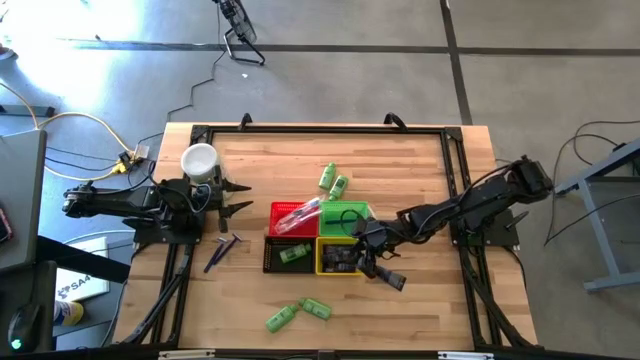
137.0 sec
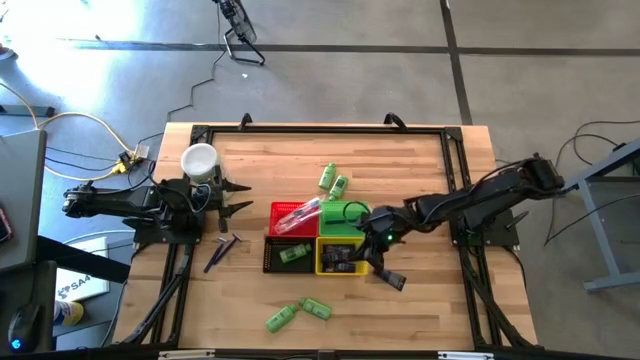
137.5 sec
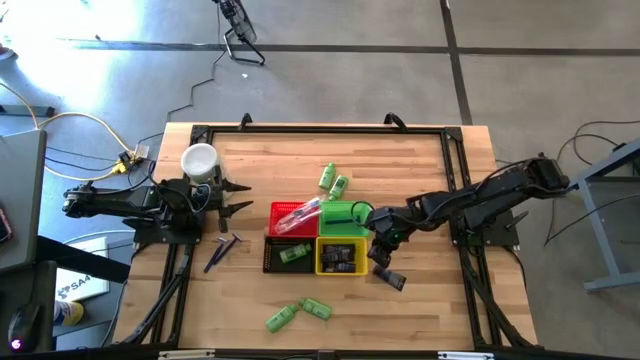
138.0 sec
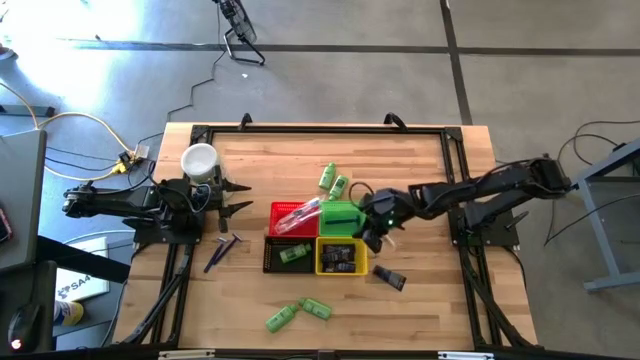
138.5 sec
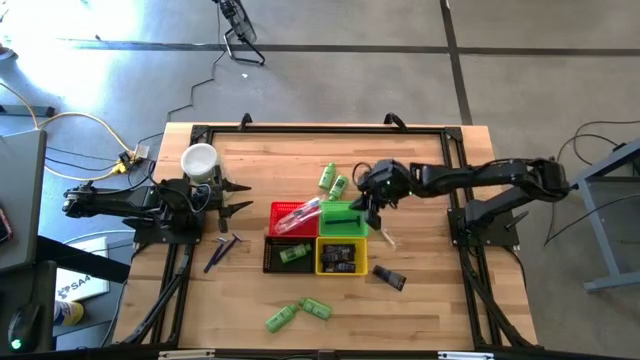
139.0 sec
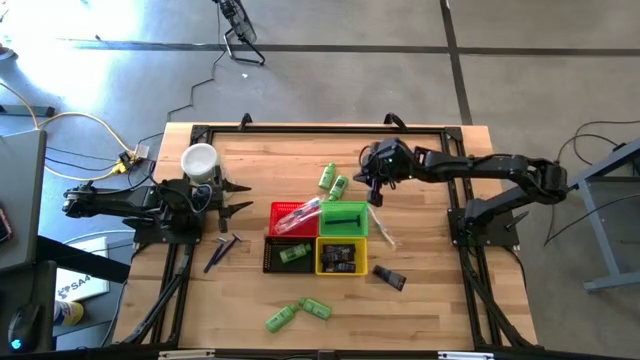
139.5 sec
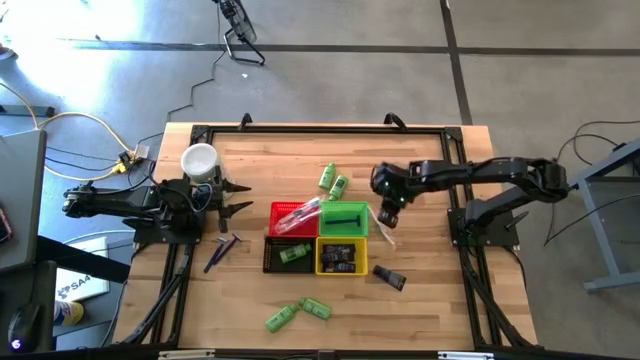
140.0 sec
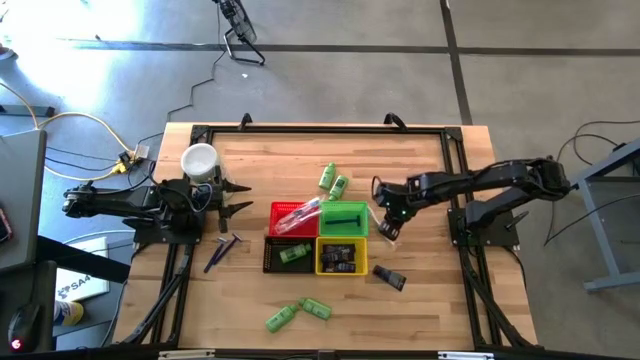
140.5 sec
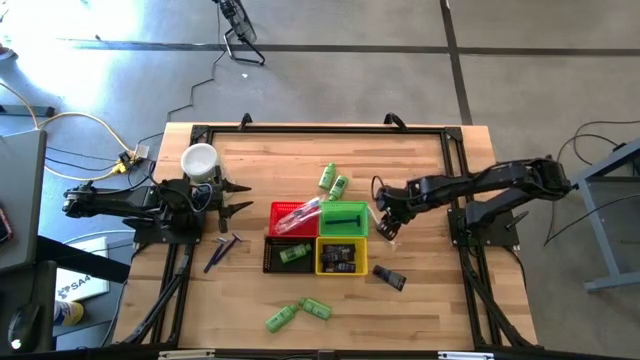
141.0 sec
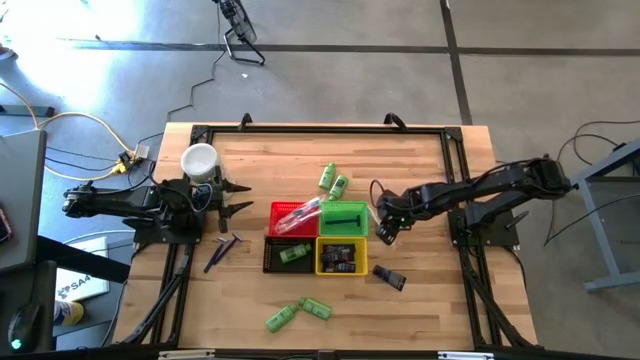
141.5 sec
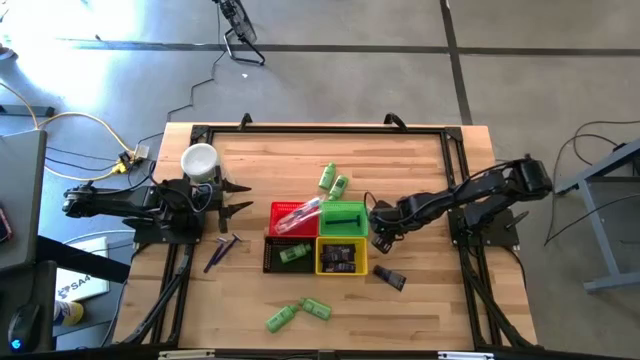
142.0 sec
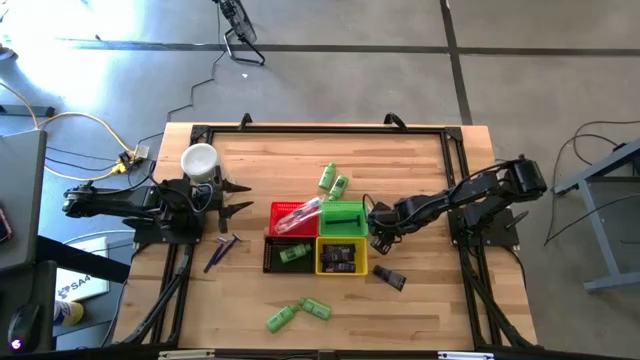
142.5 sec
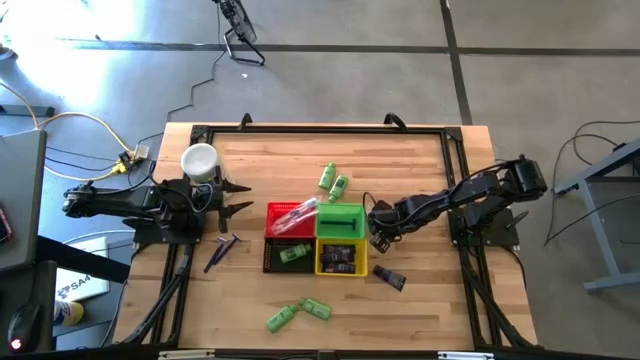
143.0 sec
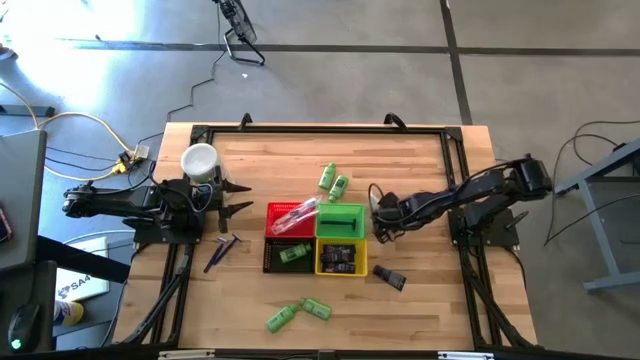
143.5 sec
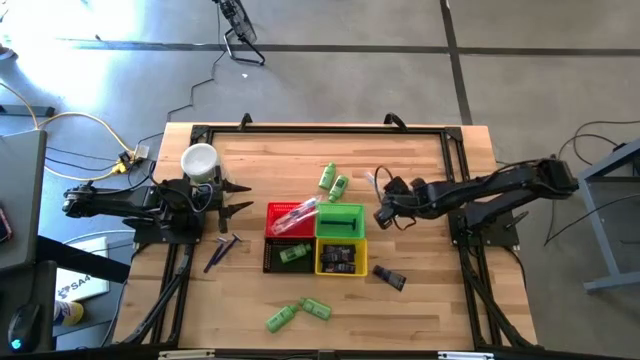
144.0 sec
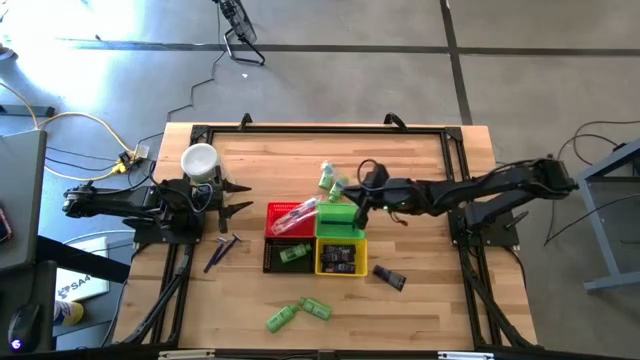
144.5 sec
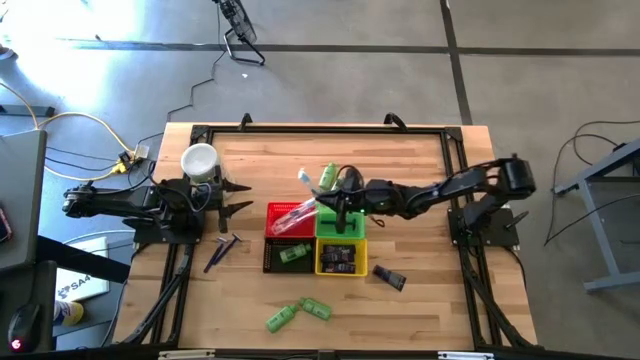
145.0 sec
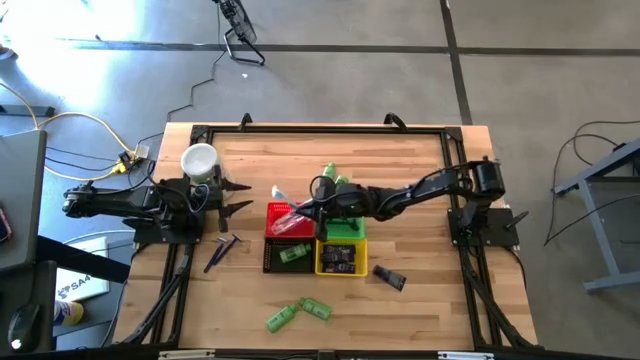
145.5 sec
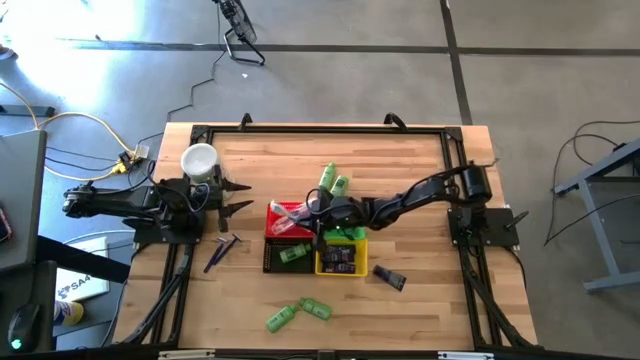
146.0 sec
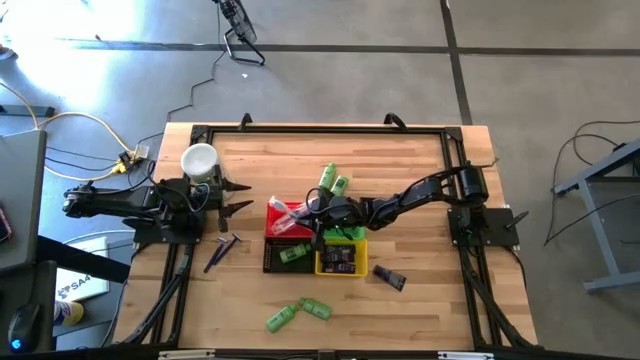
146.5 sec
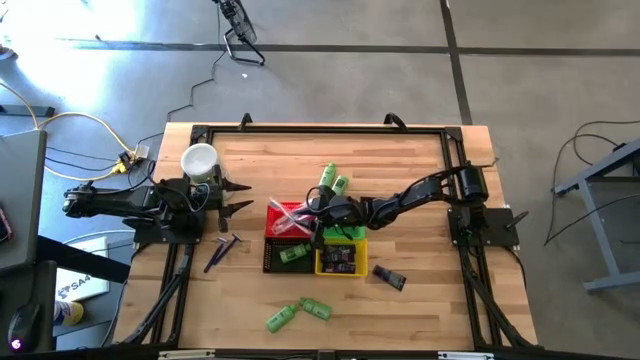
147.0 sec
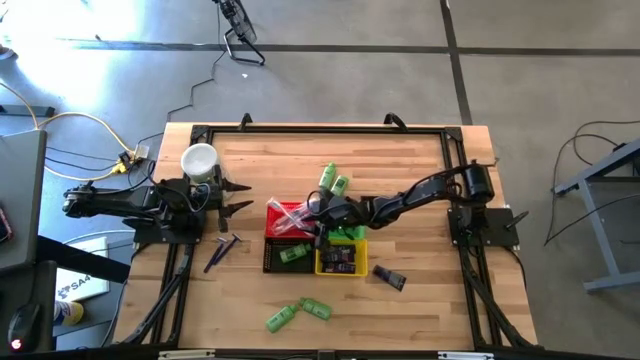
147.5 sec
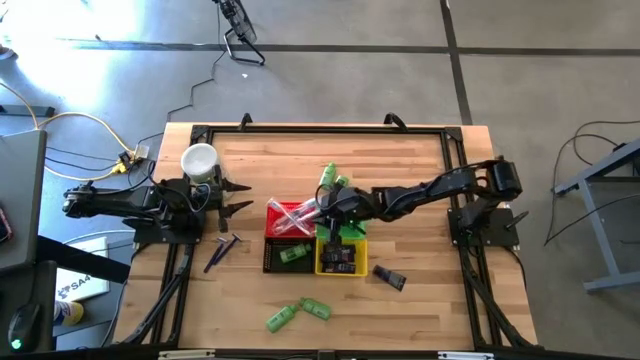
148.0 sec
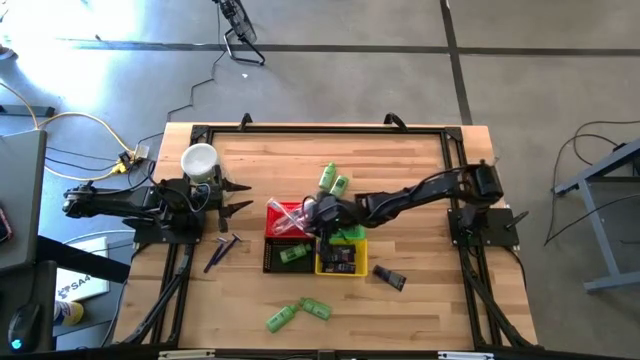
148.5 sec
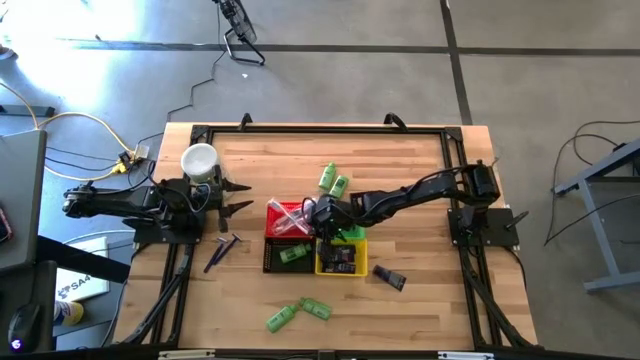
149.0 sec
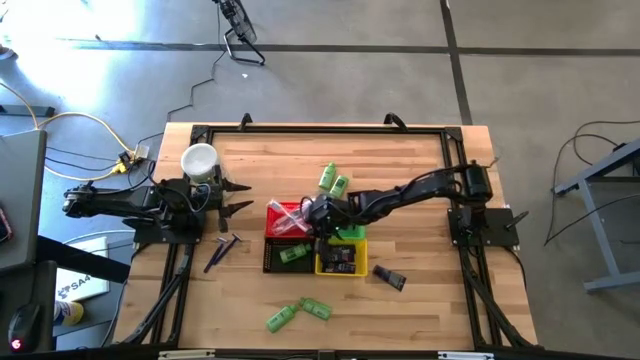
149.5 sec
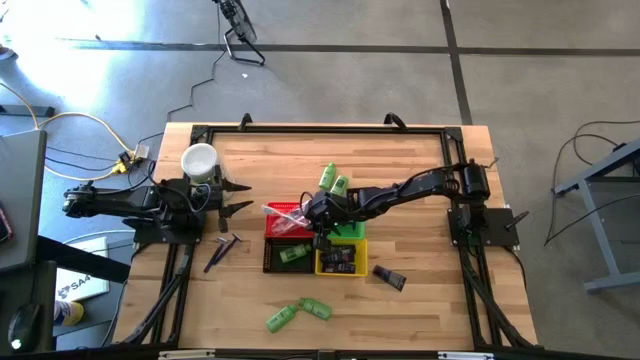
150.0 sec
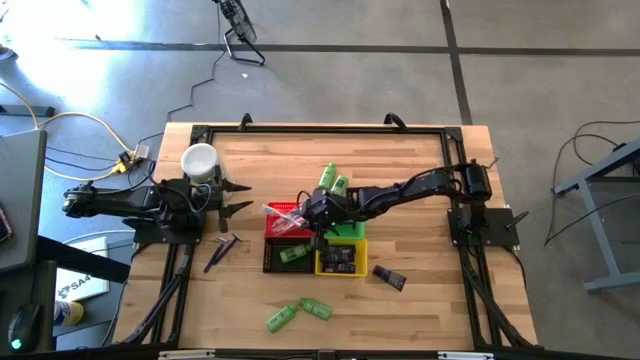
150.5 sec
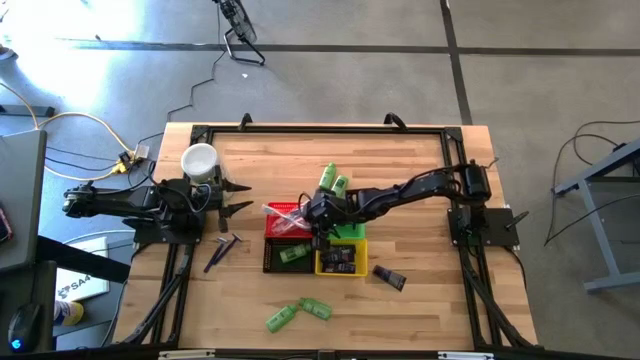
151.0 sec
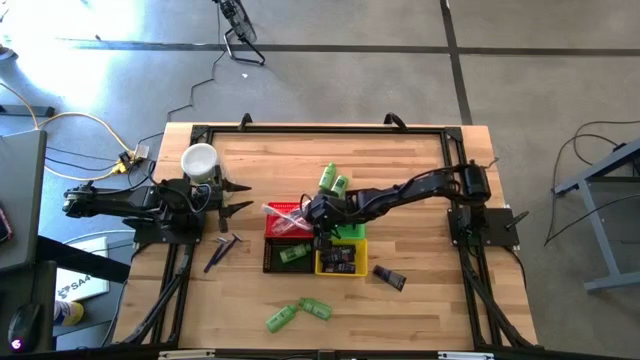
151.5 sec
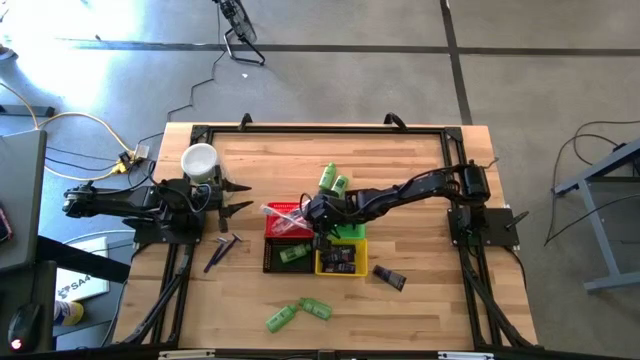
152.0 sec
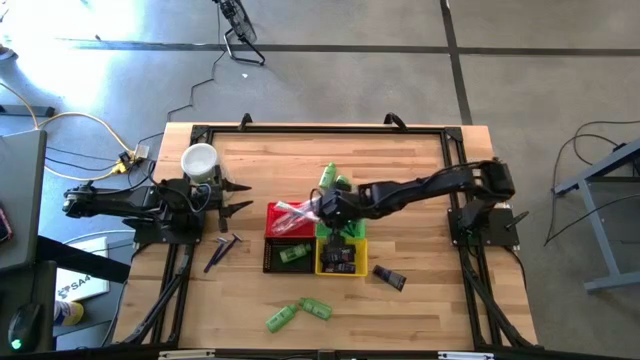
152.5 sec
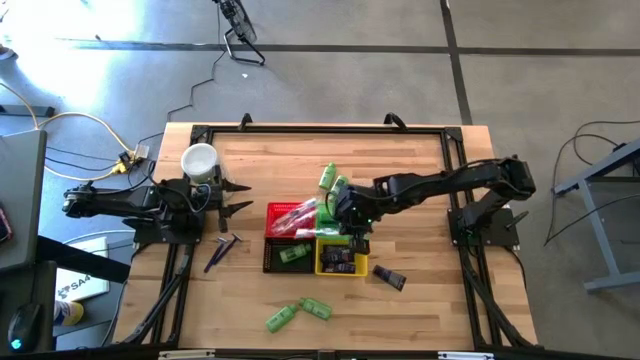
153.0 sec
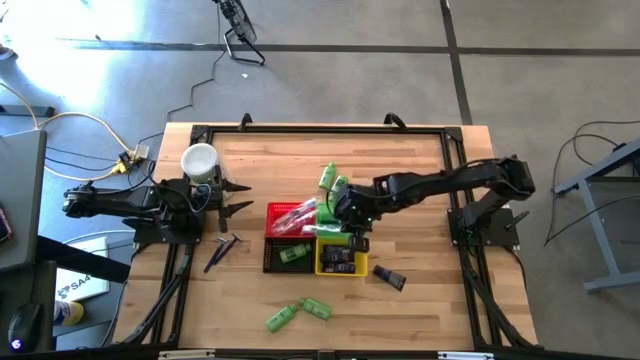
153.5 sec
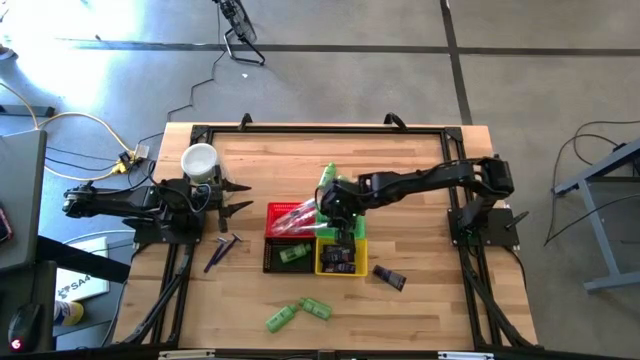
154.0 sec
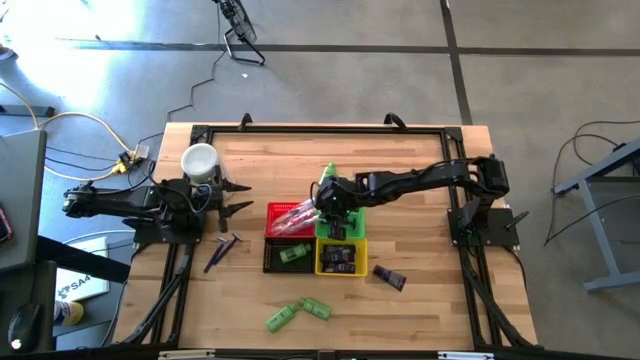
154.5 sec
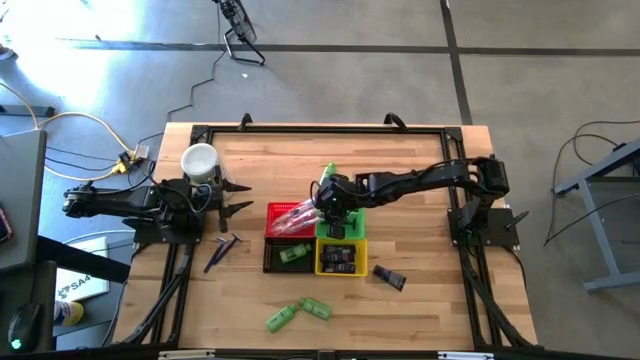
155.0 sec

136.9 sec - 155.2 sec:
Task: Pick & Place Travel size toiletries
Put the blue toothbrush into the red bin

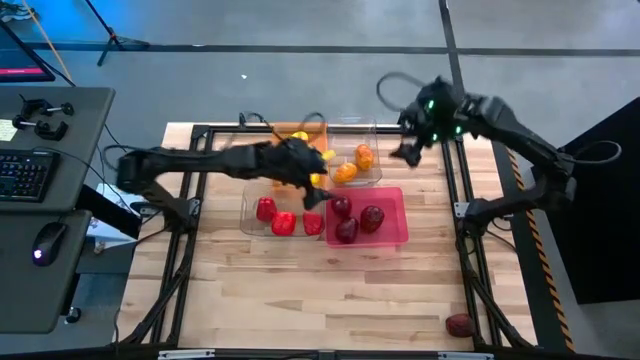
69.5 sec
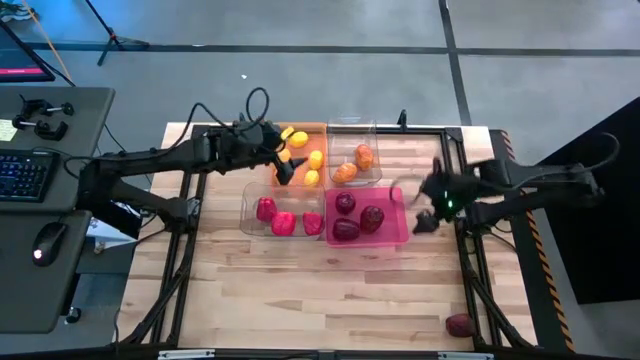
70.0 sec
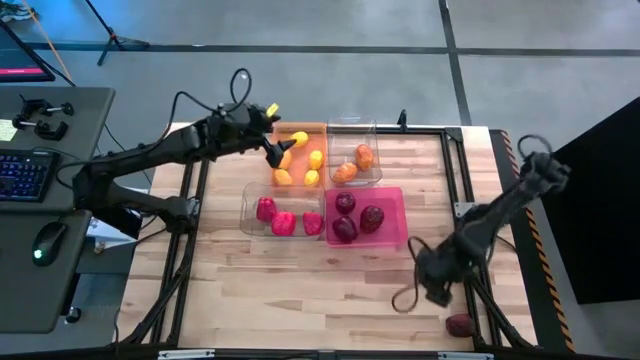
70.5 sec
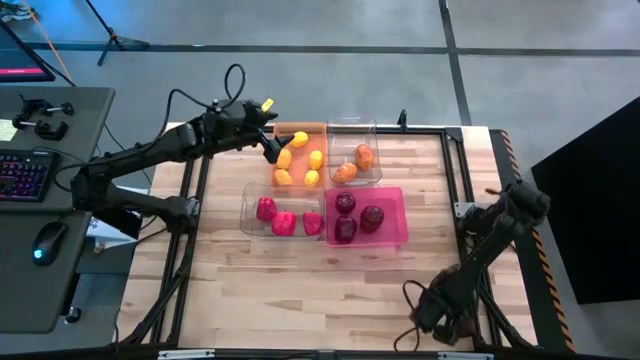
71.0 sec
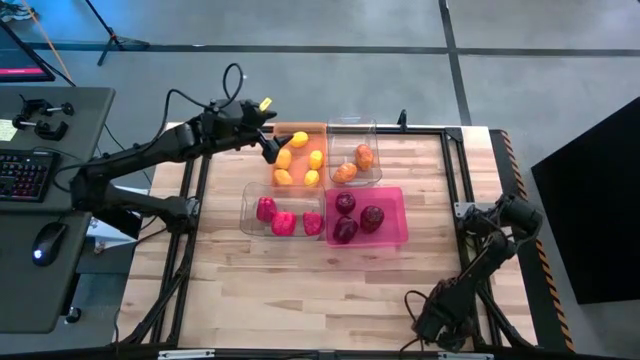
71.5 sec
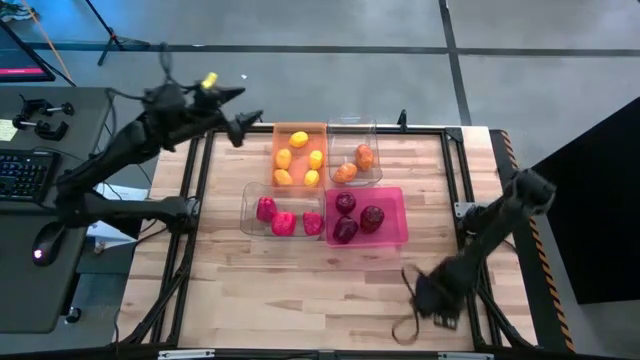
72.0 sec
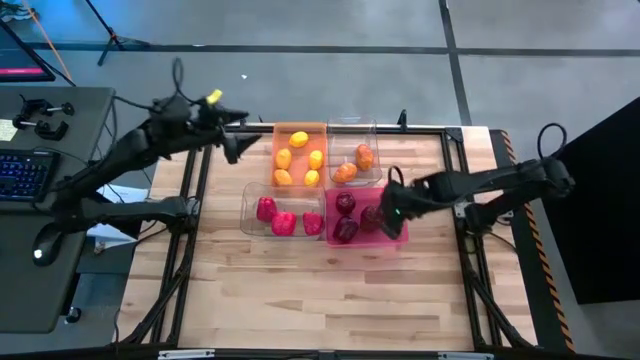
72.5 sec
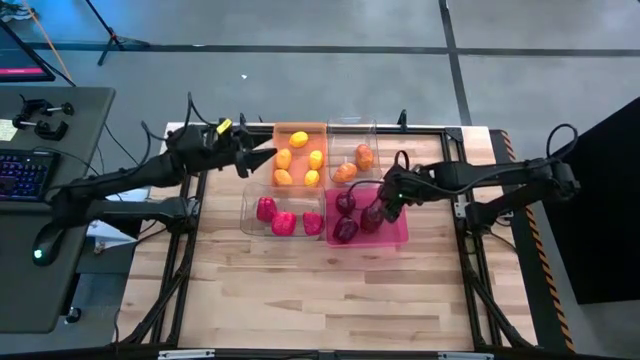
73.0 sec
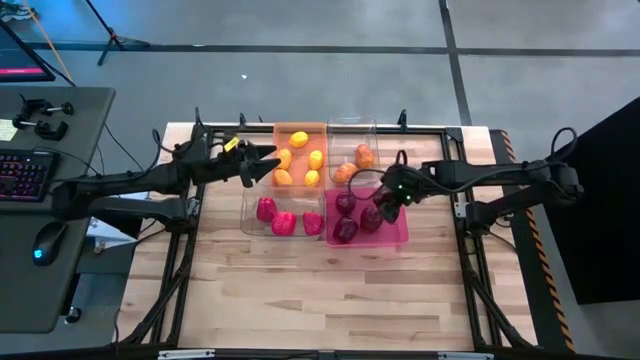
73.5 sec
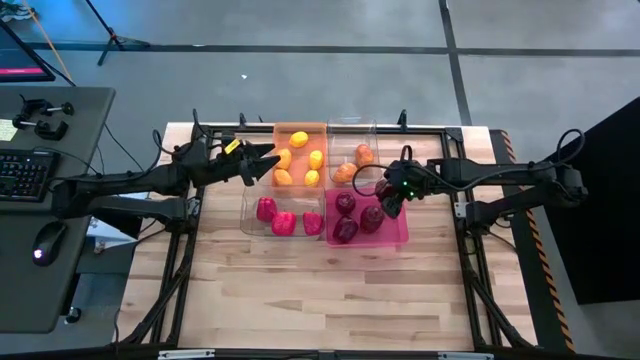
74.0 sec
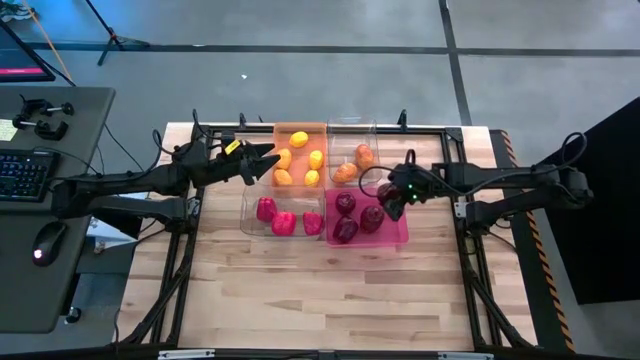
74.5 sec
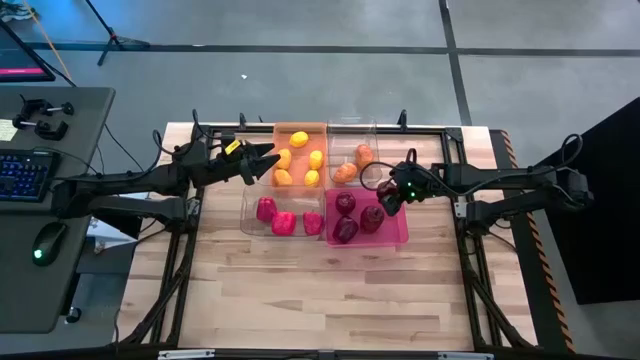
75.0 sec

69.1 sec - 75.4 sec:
Task: Sort produce into baskets
Put the red apple into the pink bin
